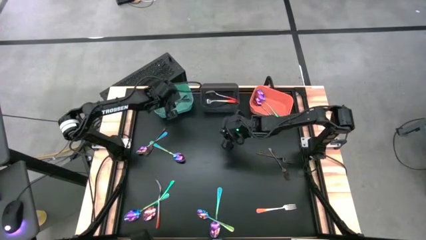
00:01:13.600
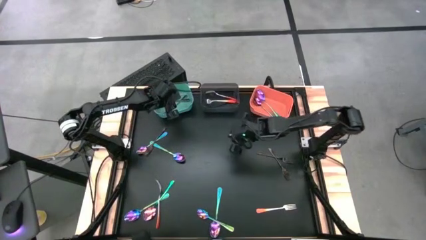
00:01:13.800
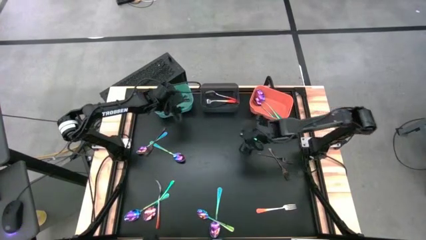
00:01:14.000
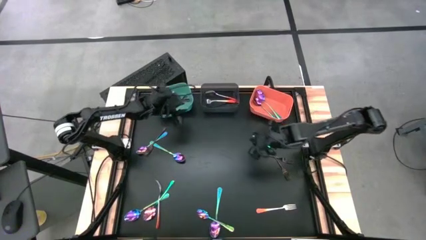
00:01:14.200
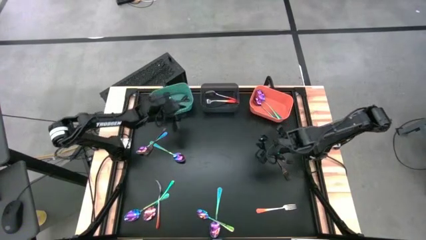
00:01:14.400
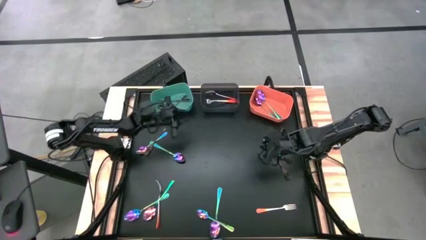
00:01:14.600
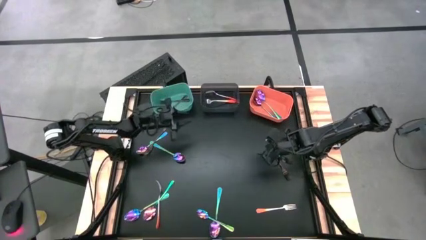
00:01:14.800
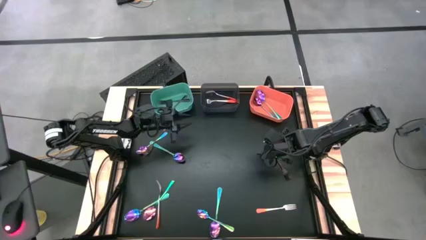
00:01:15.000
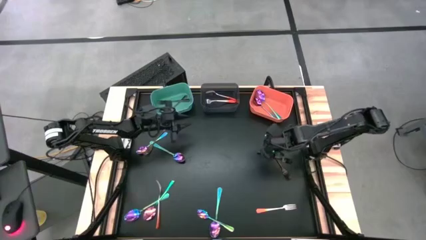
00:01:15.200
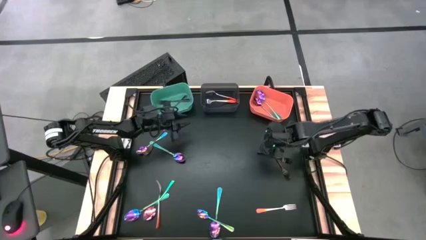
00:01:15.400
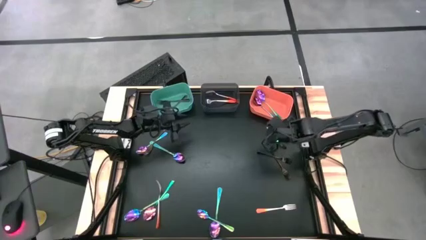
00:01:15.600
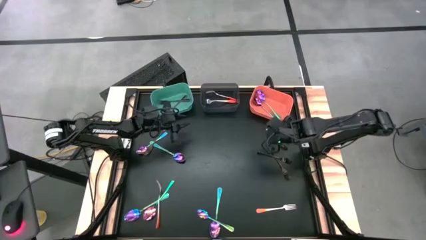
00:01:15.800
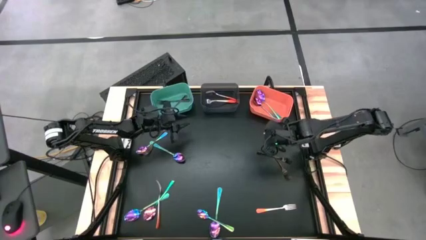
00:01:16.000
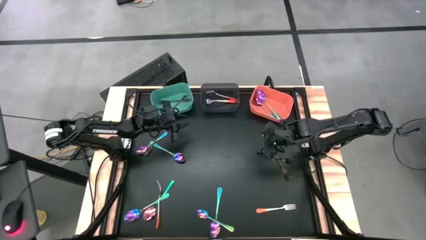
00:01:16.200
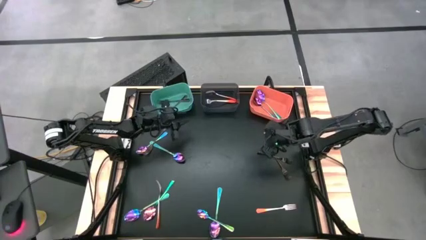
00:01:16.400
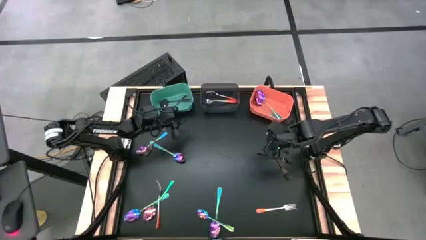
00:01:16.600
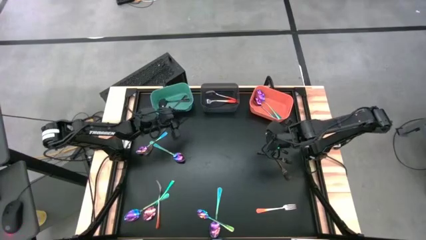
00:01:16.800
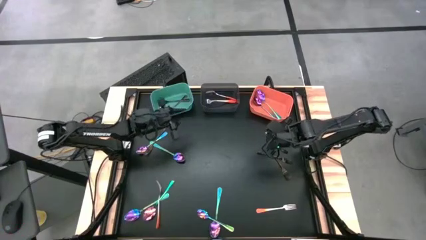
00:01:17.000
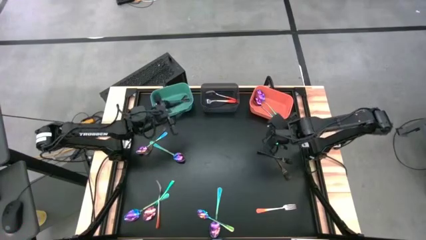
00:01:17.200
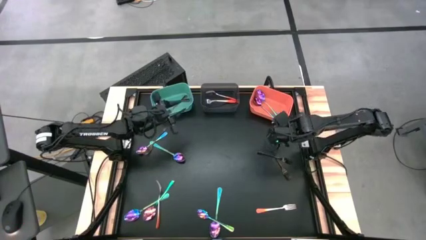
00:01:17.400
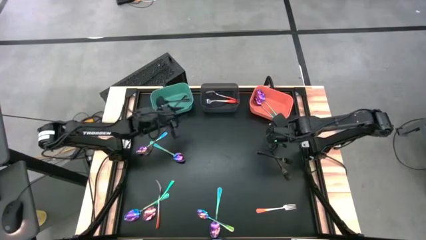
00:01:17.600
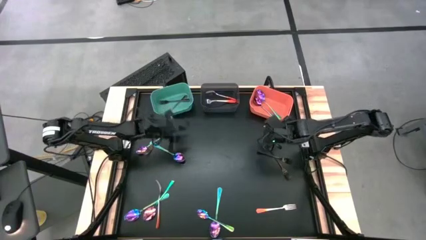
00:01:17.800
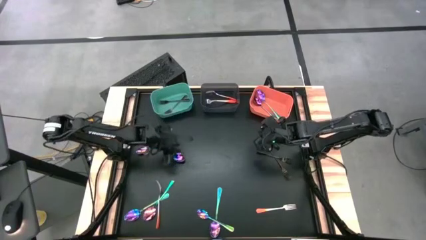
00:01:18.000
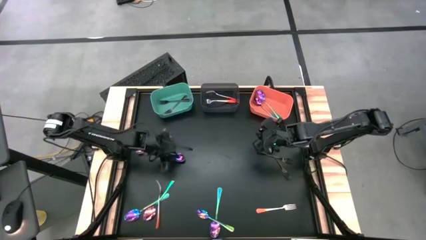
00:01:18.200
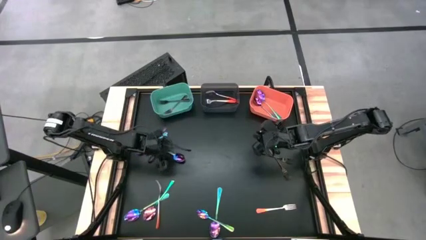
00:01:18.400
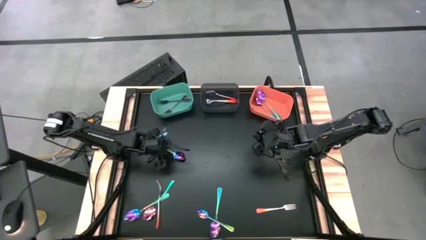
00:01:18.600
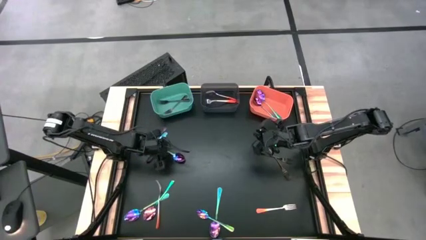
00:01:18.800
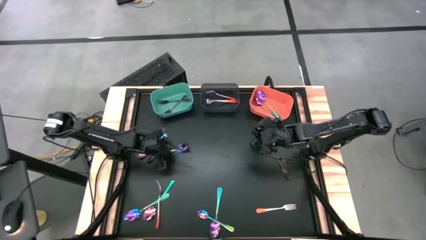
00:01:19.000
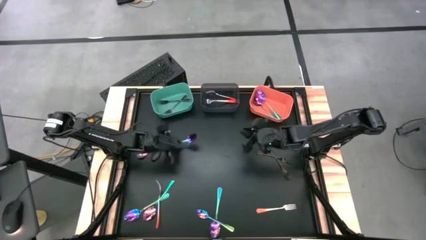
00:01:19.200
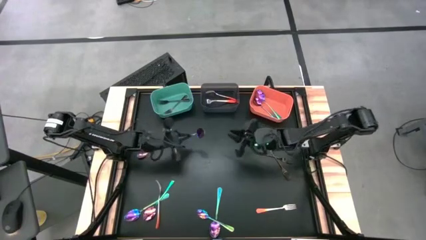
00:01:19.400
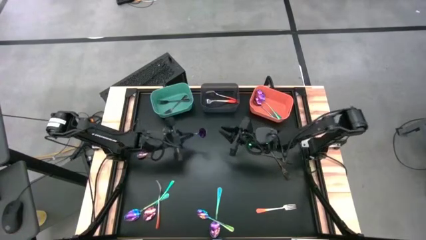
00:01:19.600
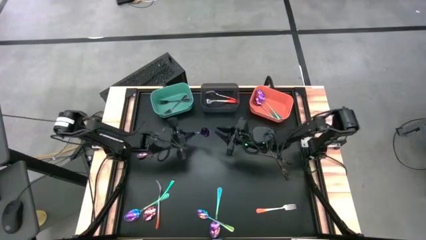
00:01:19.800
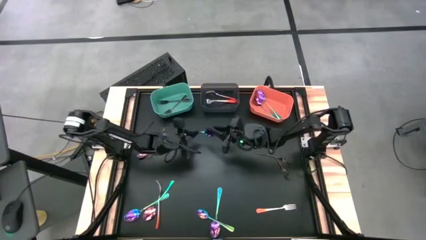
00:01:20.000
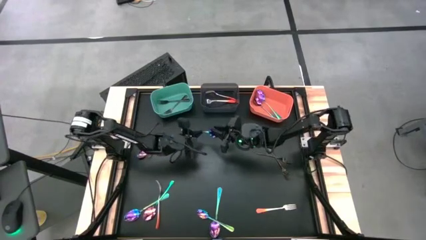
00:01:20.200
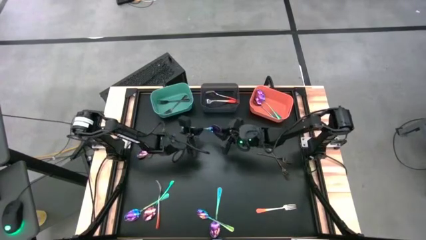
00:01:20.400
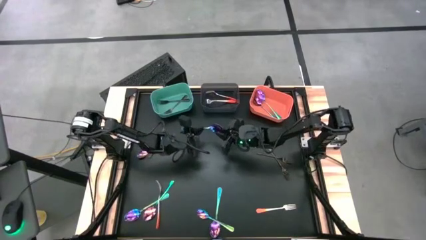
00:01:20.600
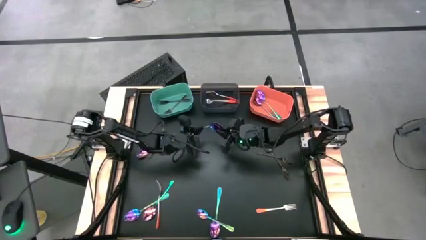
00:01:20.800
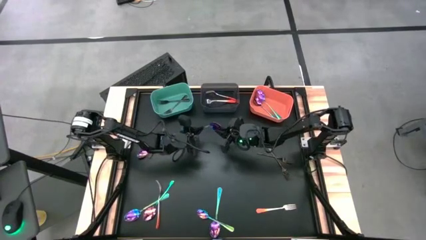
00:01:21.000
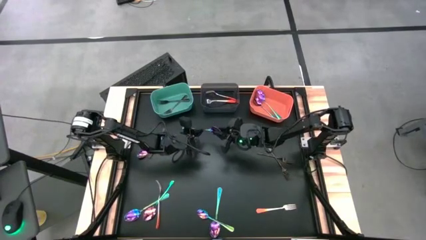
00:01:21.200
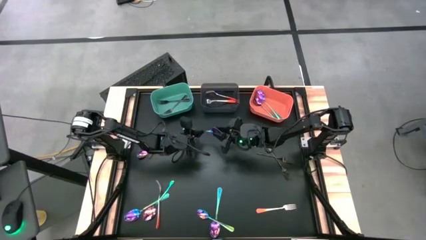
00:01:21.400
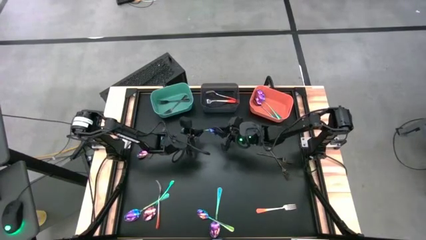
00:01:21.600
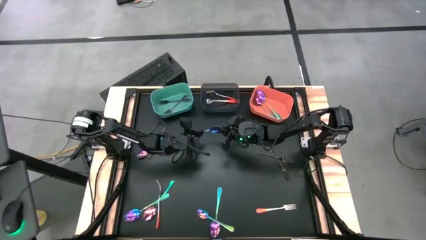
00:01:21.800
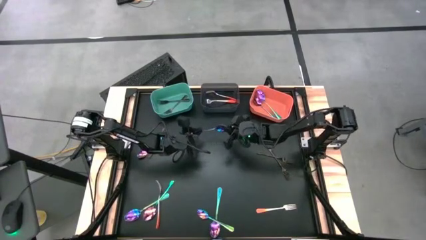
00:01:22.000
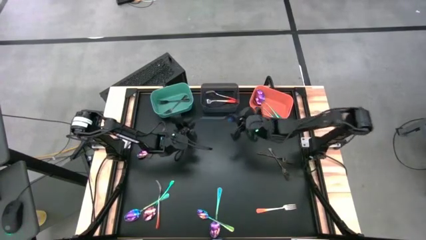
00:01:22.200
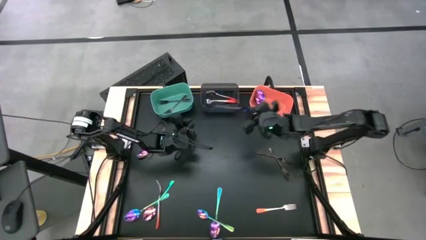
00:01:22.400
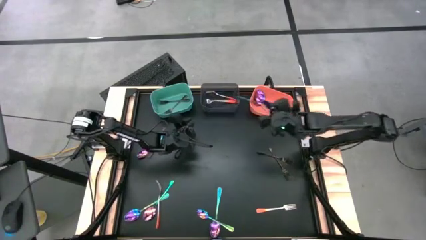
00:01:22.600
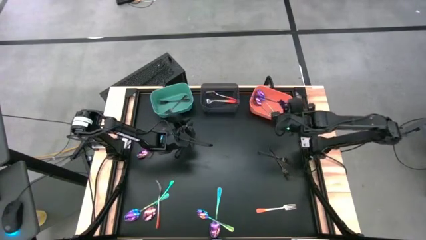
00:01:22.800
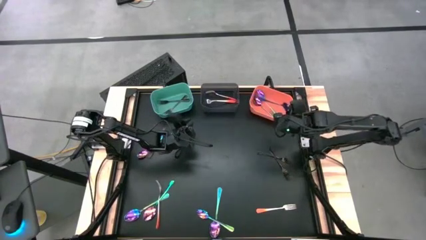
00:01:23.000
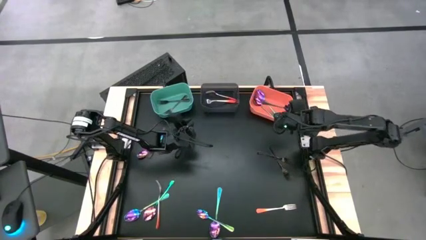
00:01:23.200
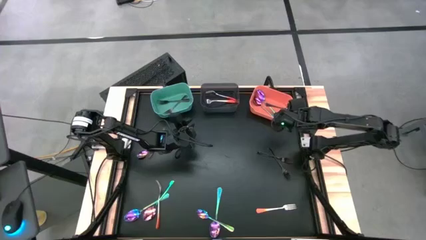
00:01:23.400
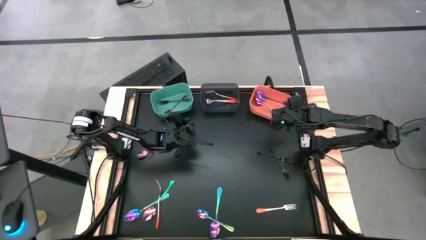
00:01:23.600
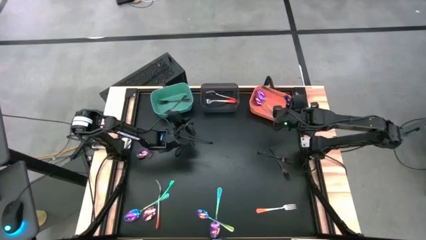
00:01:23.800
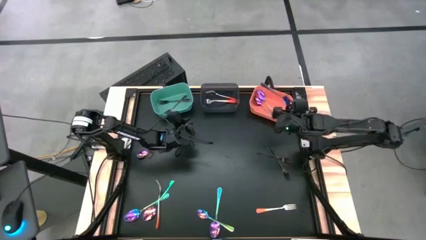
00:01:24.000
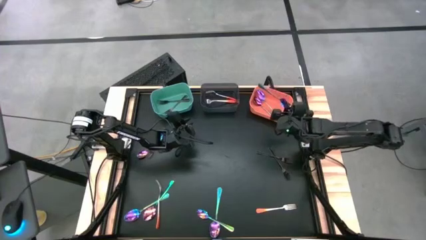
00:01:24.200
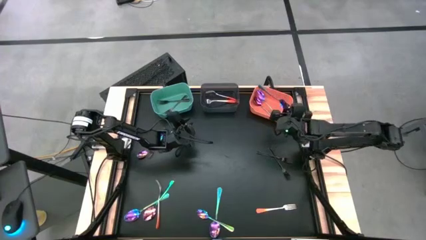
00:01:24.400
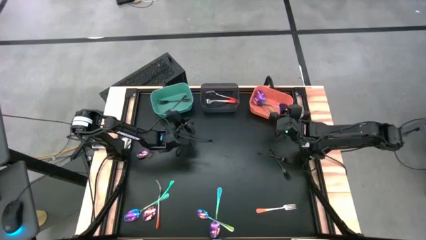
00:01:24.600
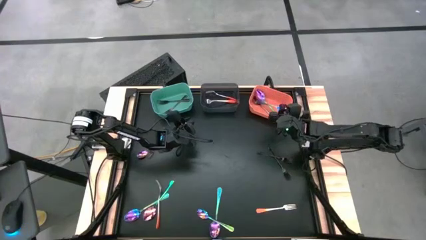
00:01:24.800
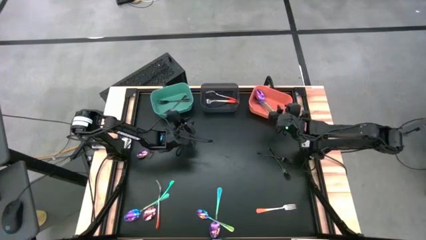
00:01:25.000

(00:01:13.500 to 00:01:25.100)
Task: Sort silverware by color (type)
Put the blue spoon into the orange bin

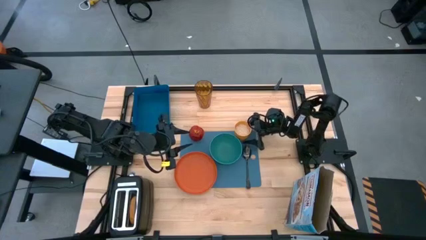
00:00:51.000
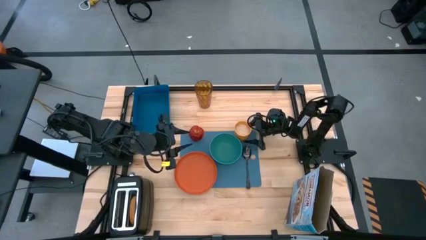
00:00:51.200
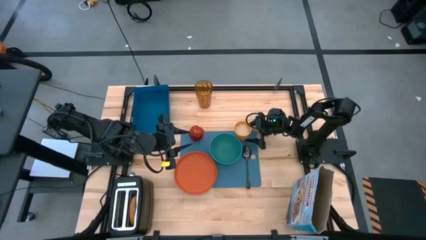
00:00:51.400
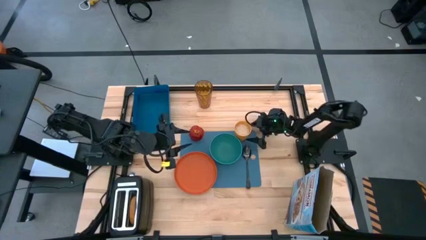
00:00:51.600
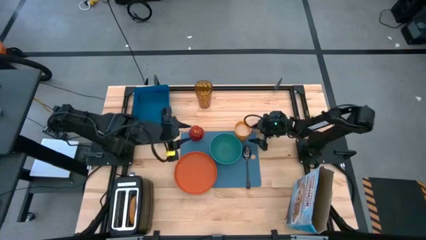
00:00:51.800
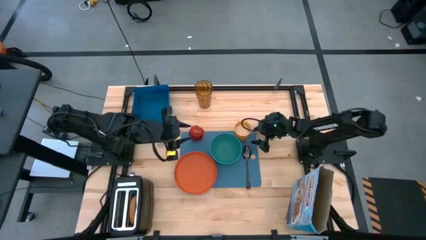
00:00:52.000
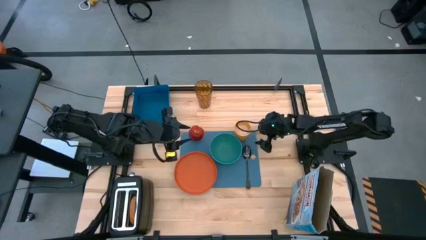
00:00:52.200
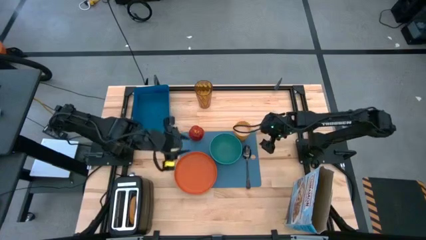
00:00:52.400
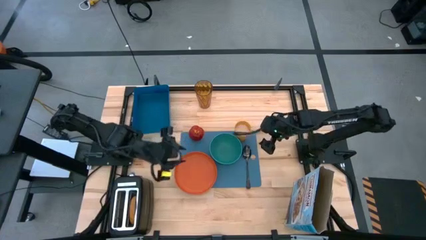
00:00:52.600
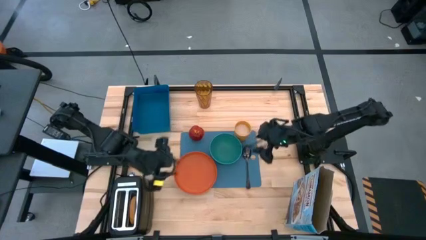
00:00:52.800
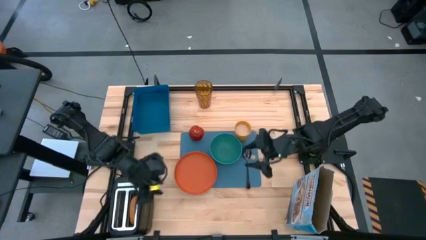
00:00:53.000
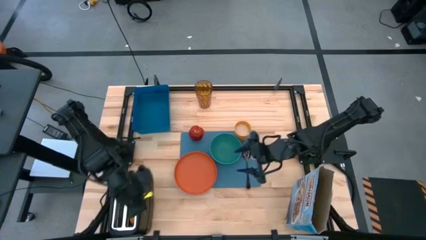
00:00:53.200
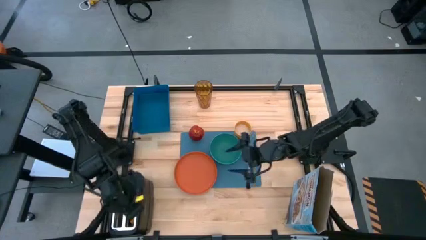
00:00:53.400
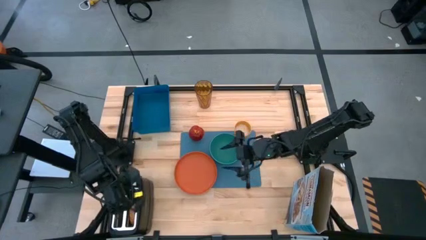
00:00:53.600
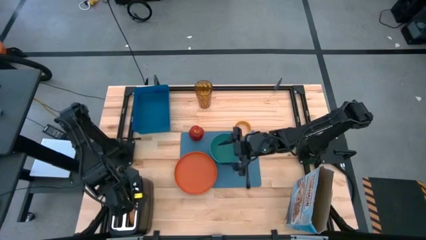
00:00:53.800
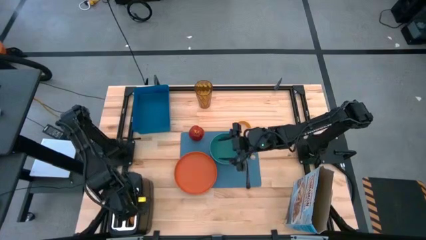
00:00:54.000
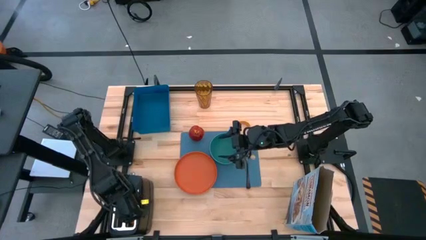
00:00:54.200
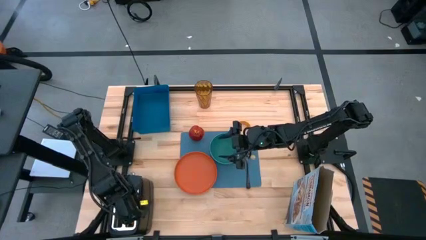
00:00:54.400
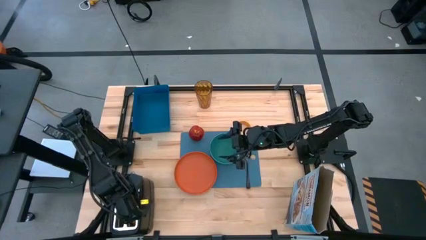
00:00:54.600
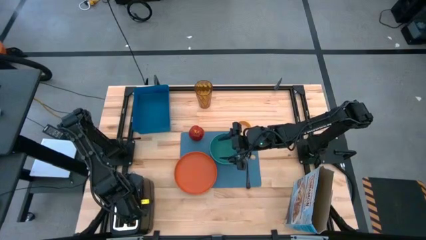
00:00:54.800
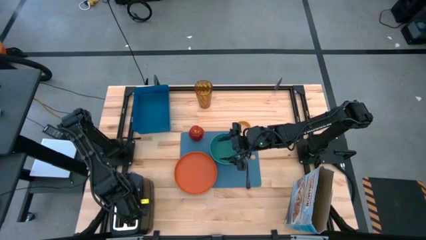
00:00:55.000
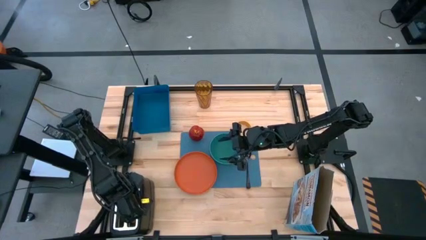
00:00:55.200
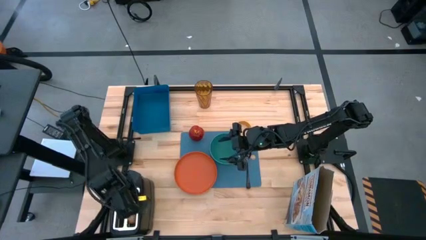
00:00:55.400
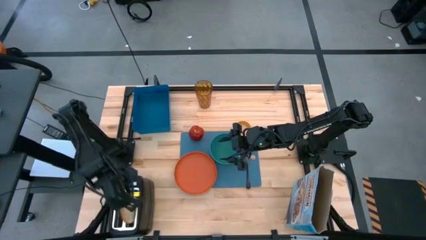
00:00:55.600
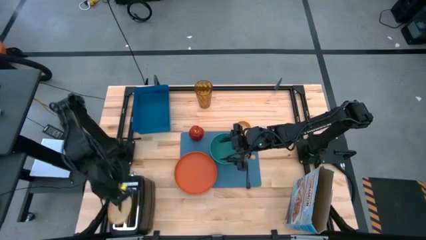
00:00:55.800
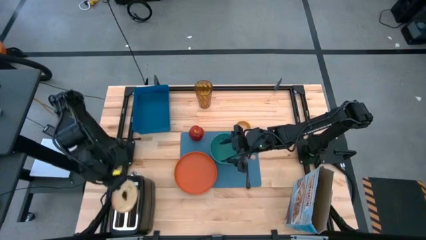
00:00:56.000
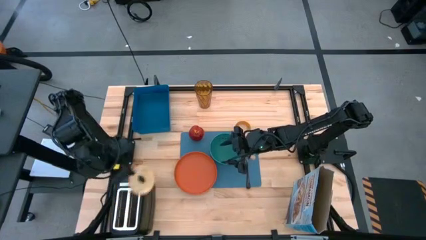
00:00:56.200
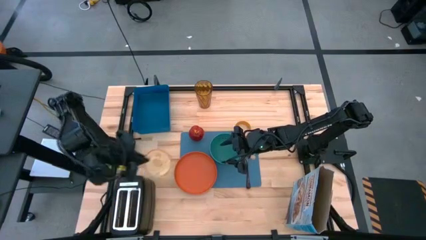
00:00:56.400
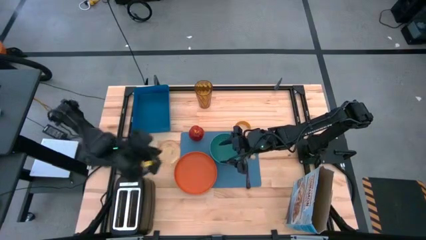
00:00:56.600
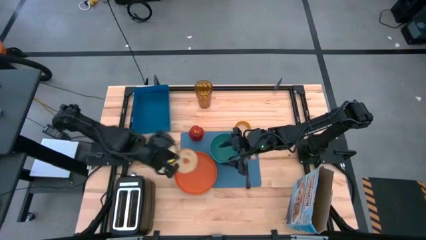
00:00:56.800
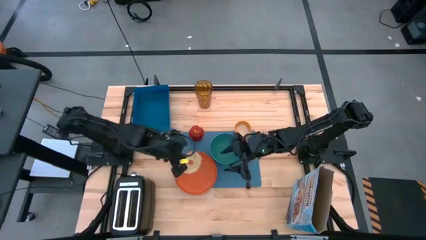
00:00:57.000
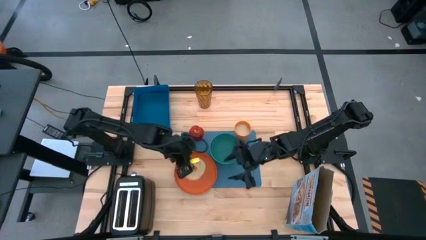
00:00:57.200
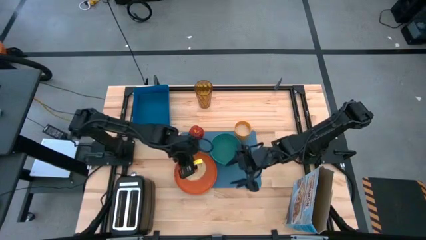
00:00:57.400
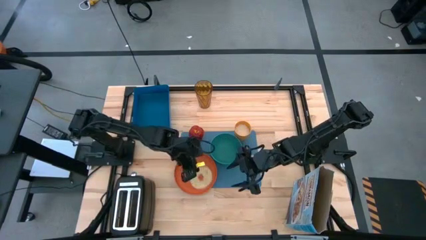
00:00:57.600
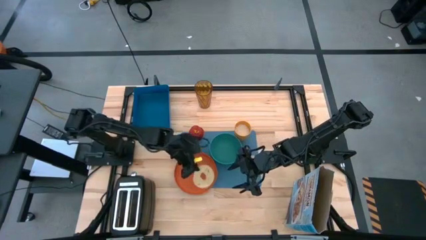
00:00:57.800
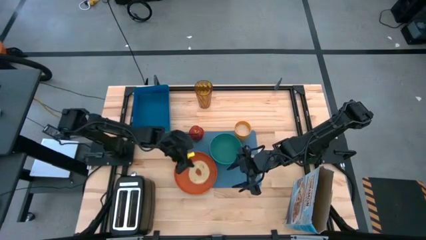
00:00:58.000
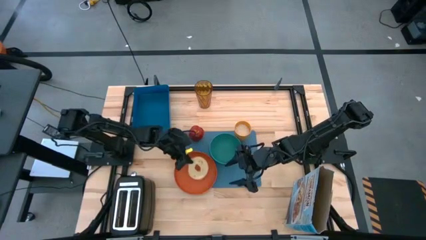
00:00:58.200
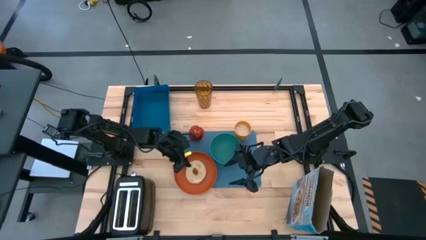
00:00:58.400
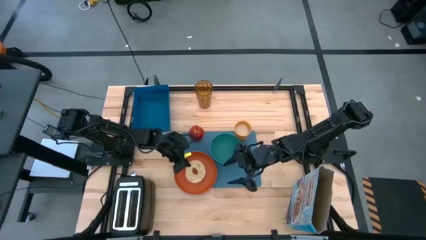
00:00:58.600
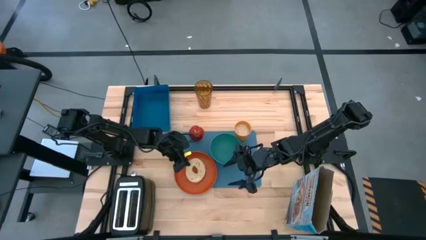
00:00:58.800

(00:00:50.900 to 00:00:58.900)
Task: Arrange a breakfast setting
Put the brown bagel on the orange plate
